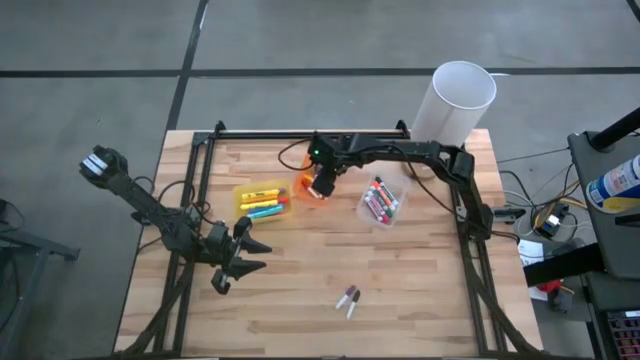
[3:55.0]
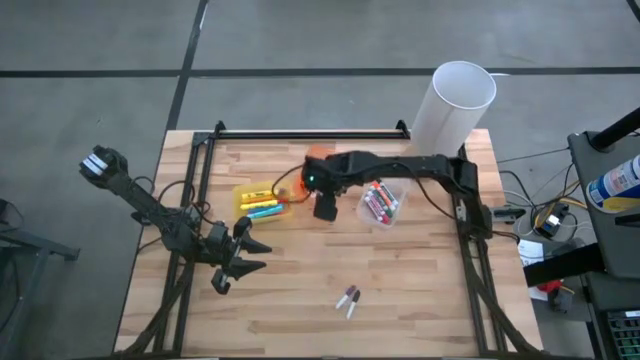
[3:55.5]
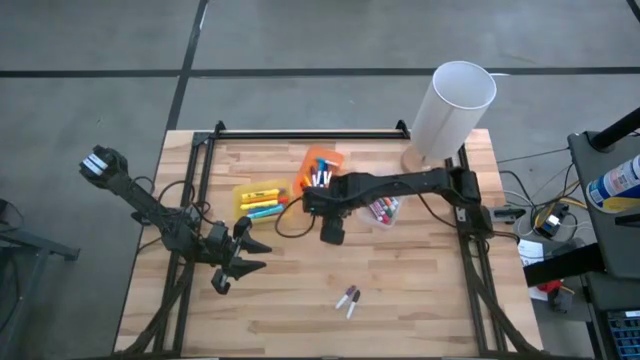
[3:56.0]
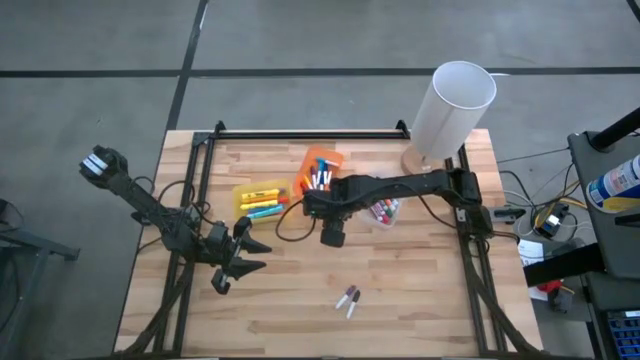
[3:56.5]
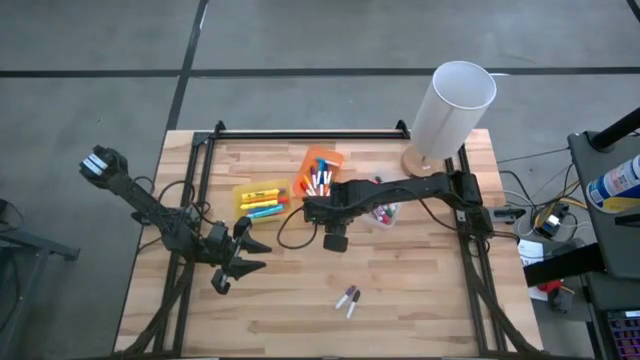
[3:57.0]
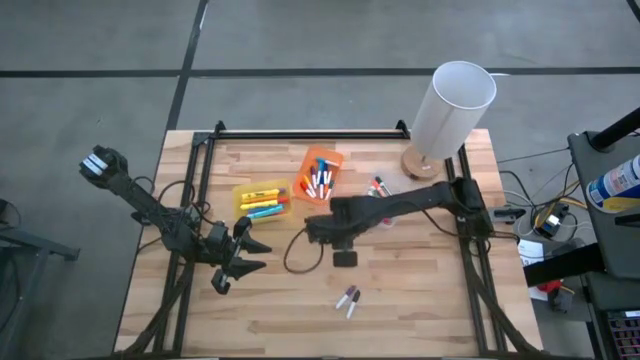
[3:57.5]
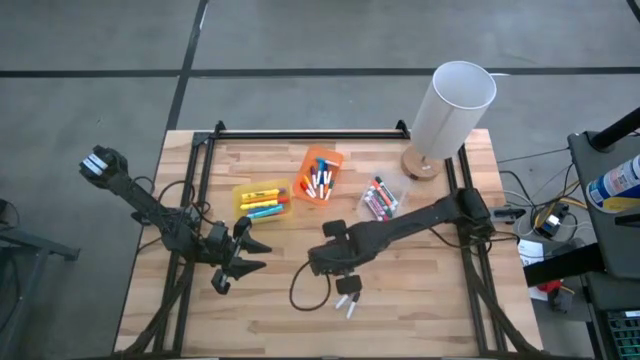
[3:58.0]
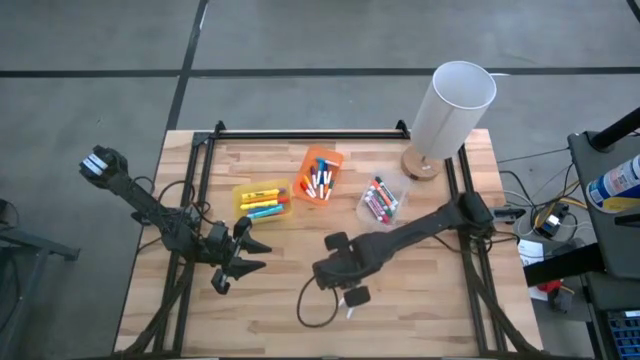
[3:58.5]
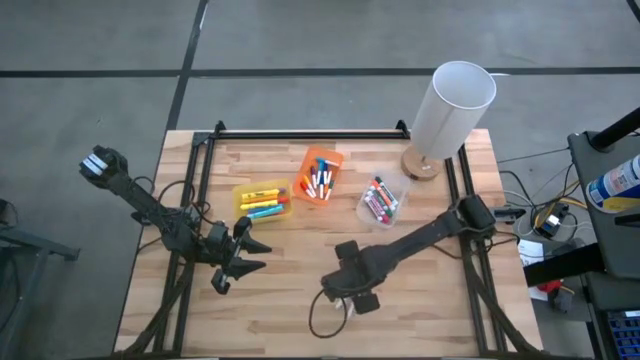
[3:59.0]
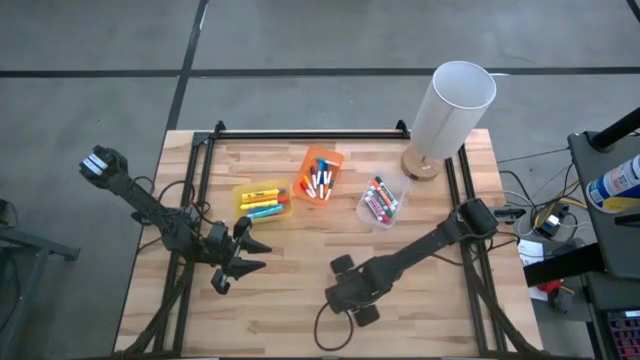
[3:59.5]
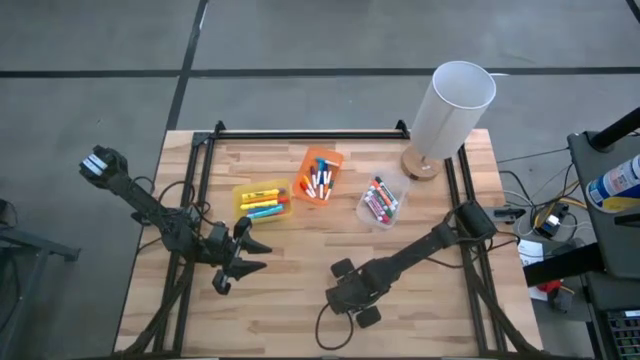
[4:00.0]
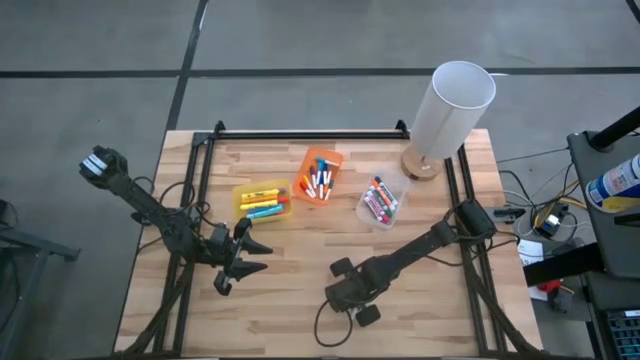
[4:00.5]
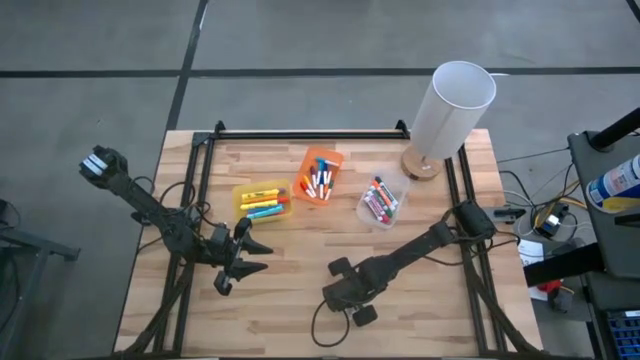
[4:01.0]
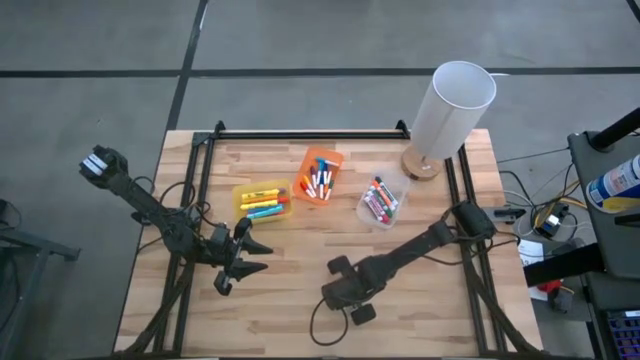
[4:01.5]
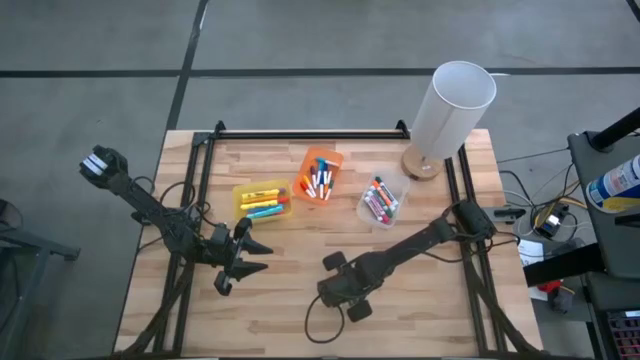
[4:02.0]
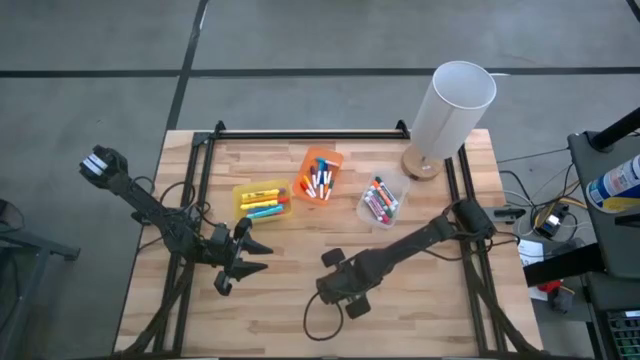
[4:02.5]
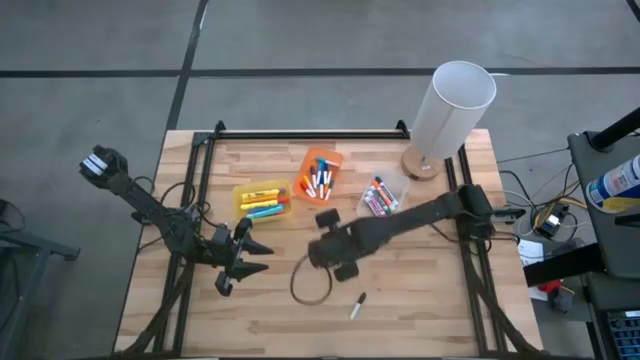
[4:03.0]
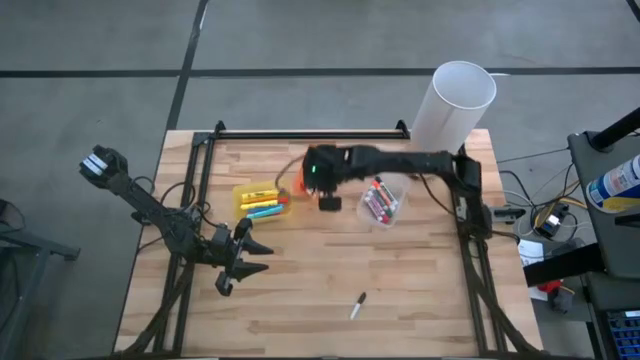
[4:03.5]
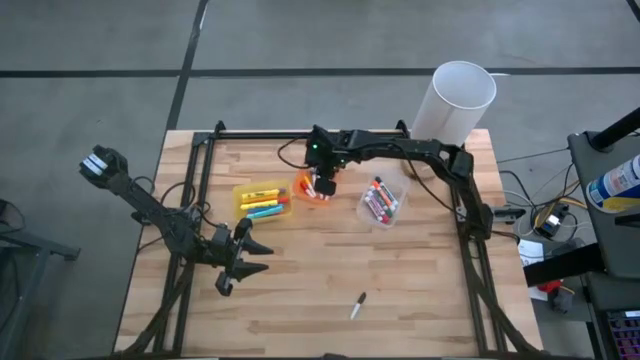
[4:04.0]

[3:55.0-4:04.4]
Task: Pick & Place Markers
Put the violet pen into the orange bin

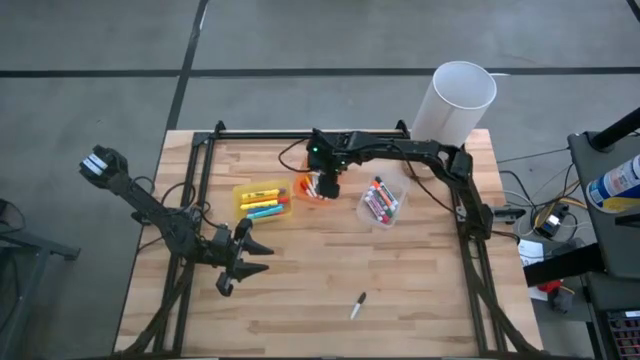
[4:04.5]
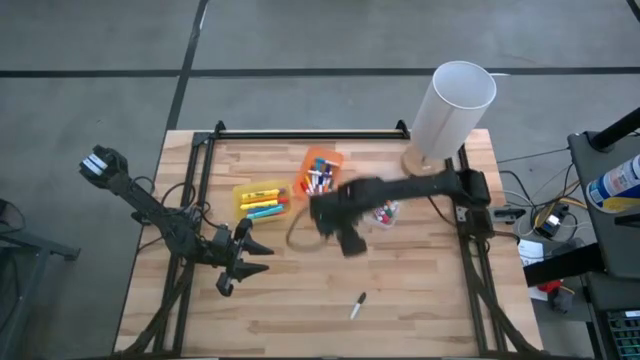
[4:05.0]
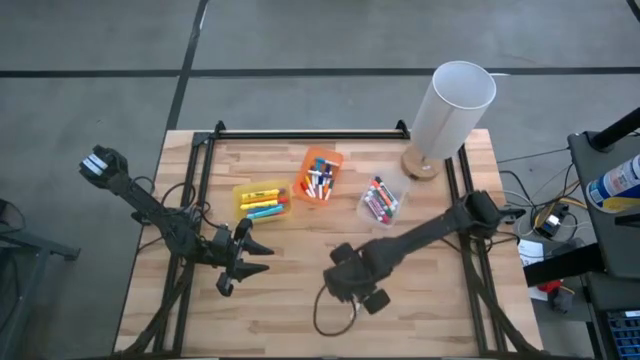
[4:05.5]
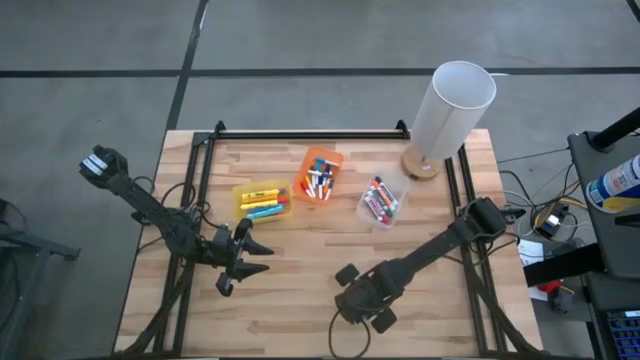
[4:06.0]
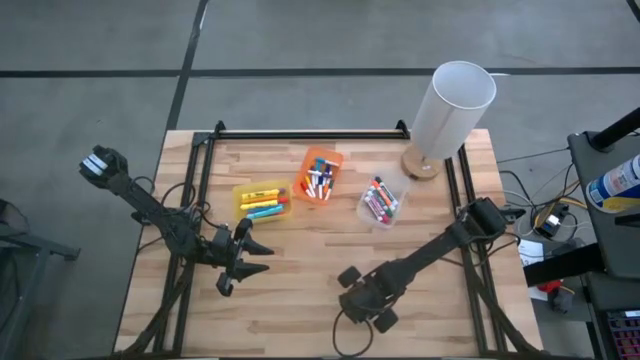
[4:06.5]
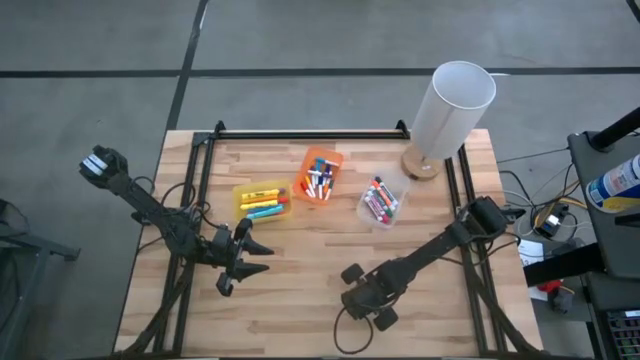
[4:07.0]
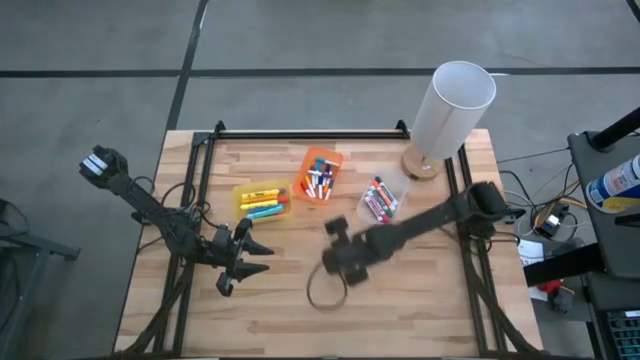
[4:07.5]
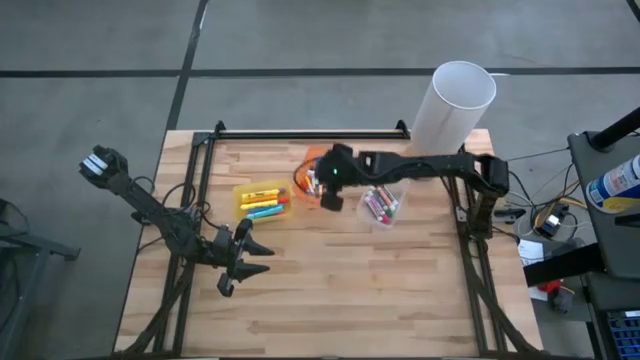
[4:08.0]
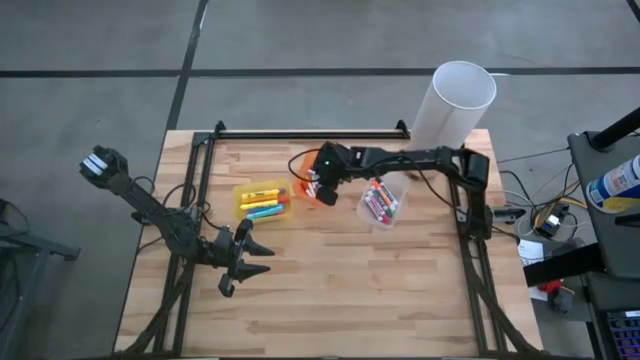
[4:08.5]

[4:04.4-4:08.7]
Put the black pen into the orange bin

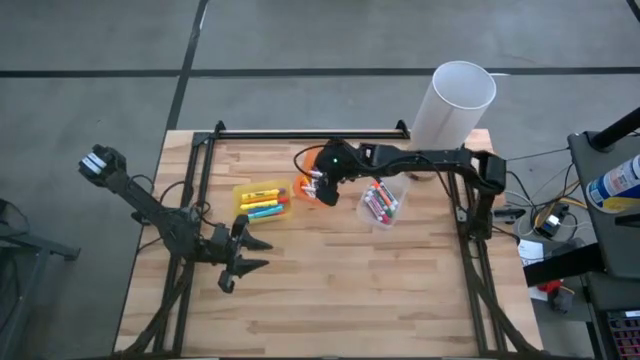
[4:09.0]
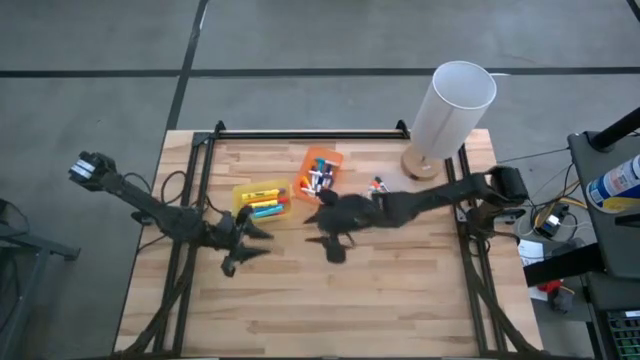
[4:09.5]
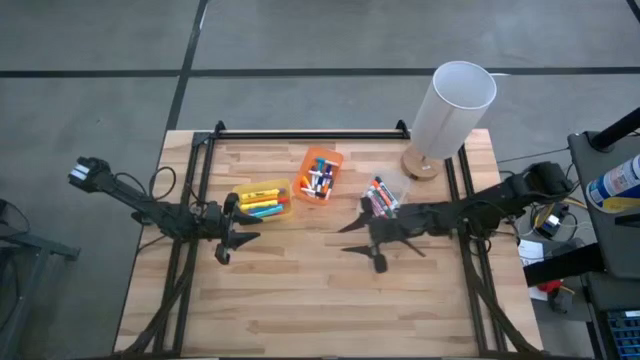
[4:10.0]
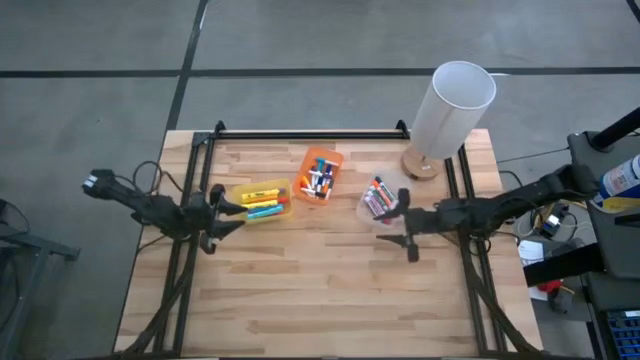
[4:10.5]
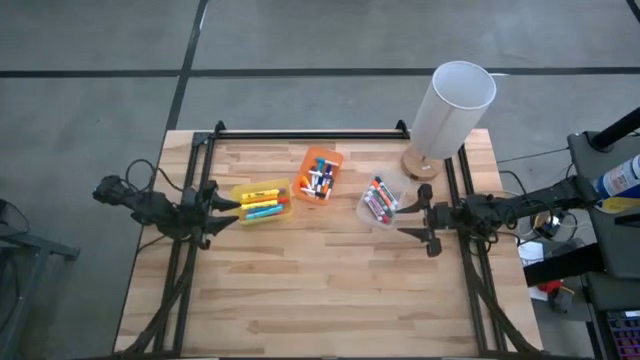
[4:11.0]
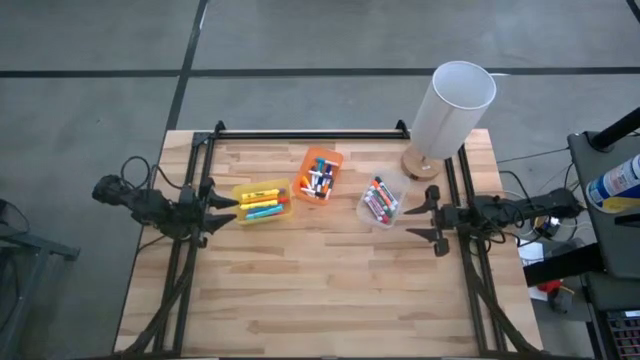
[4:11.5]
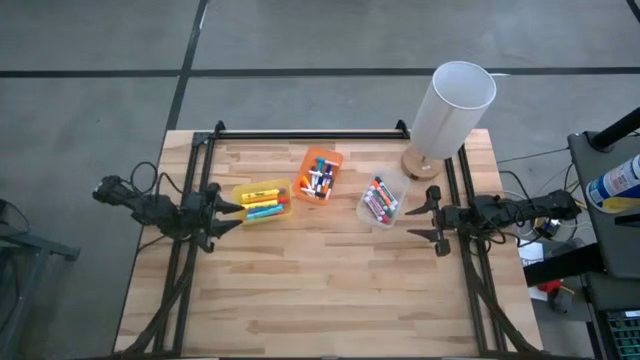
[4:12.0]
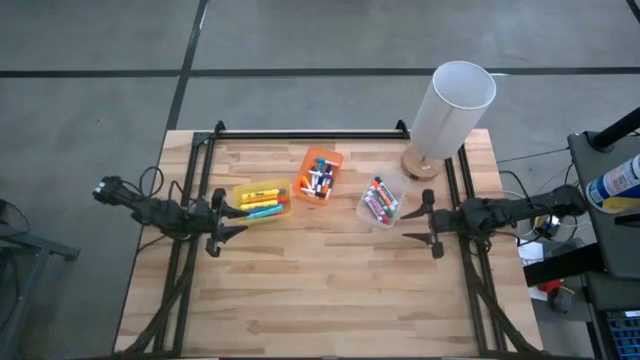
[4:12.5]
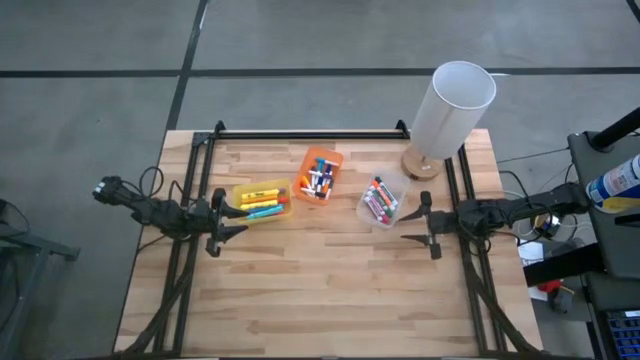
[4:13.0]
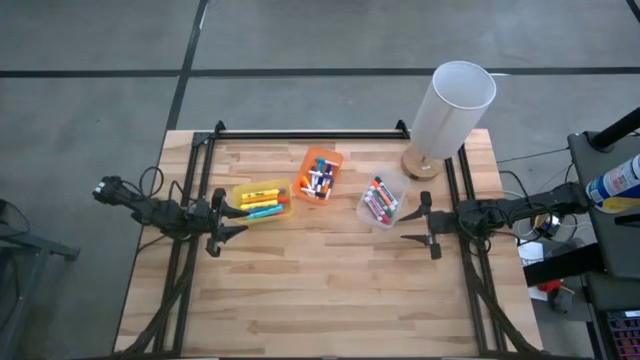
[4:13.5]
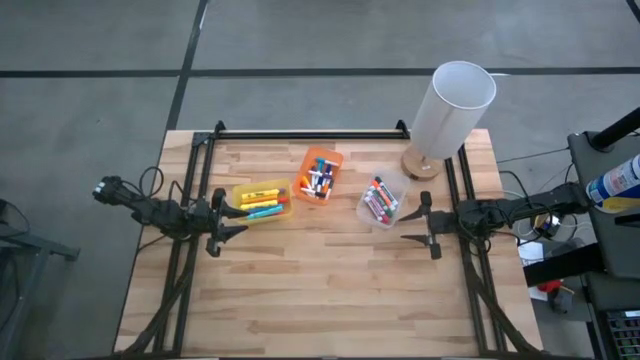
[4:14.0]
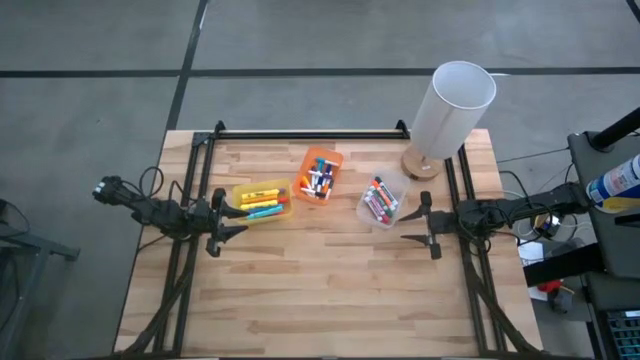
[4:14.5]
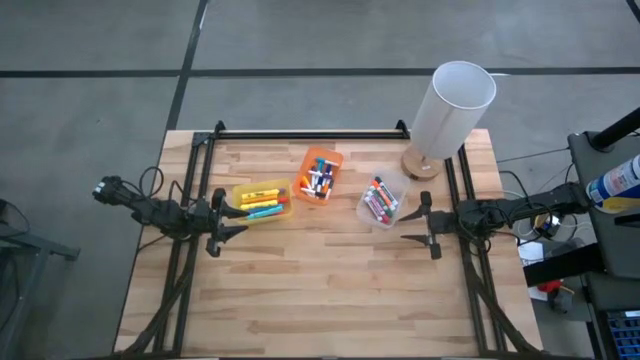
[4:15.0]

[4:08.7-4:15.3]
Return to Home Position

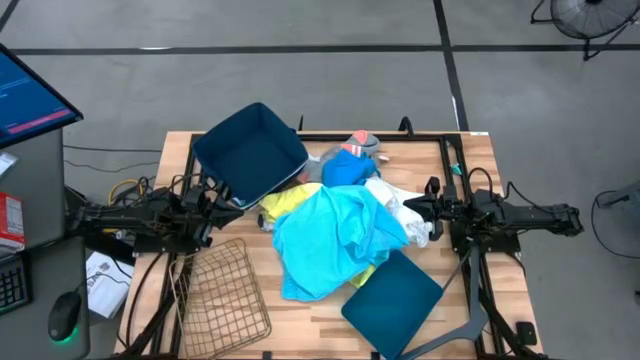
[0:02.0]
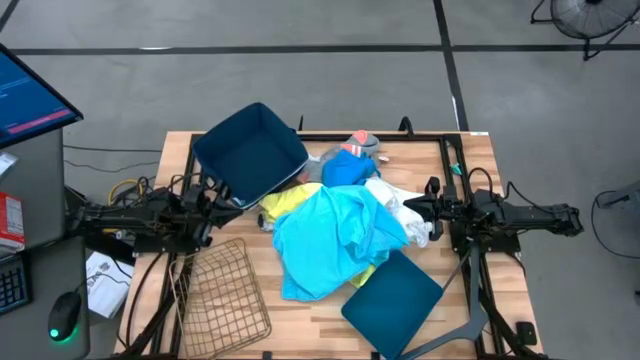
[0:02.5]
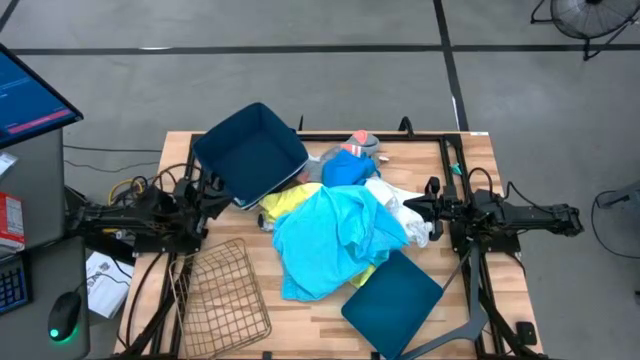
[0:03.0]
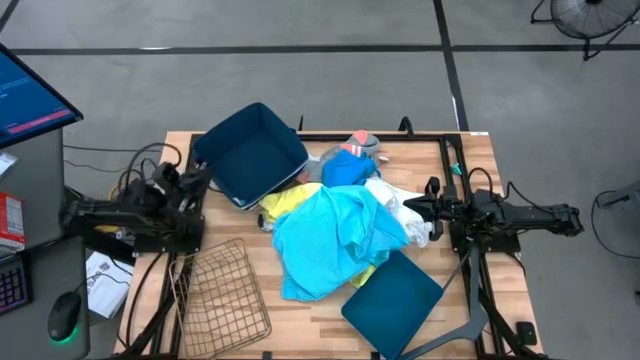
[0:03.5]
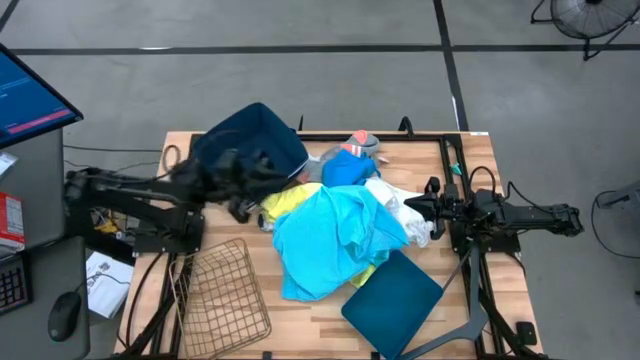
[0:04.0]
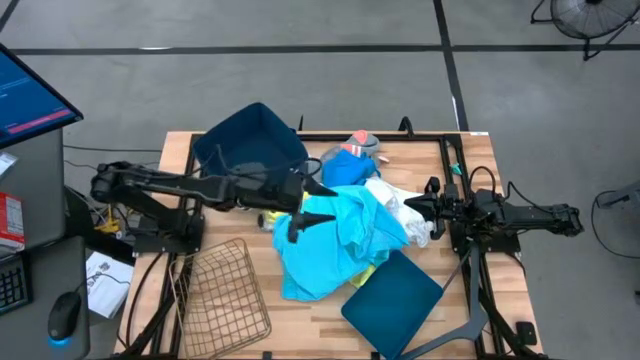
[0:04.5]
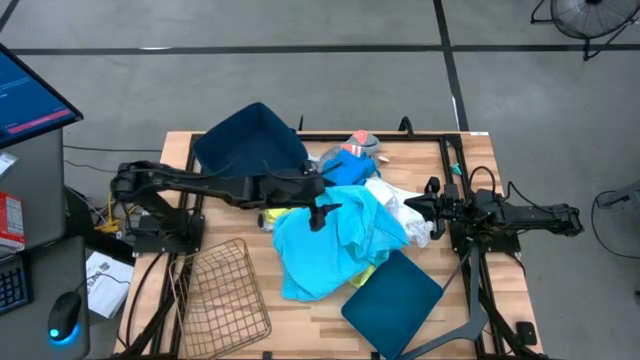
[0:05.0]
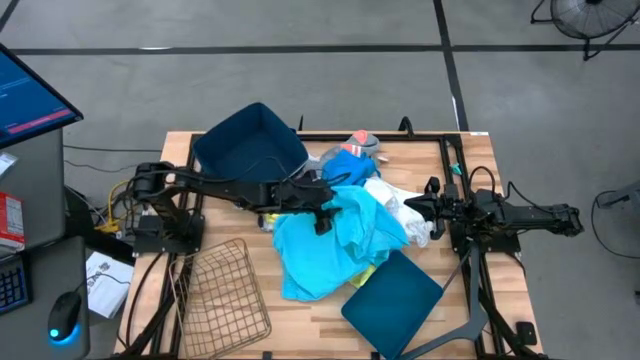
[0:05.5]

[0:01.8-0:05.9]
Task: Pick & Place Cloths
Put the light blue short into the wire basket
